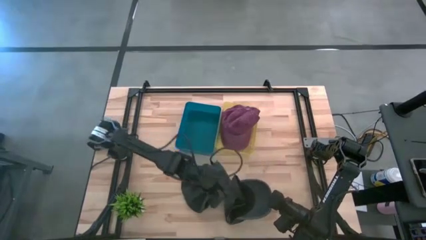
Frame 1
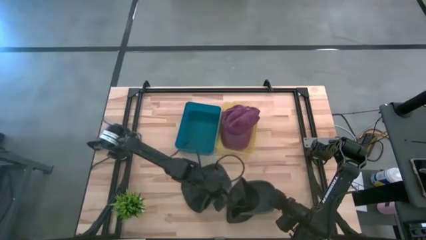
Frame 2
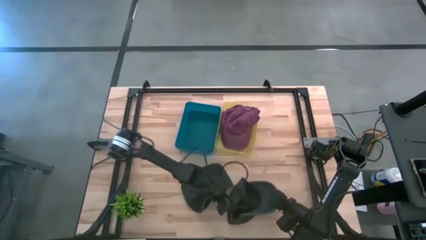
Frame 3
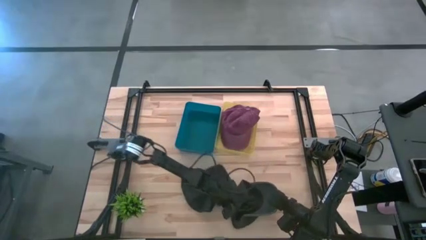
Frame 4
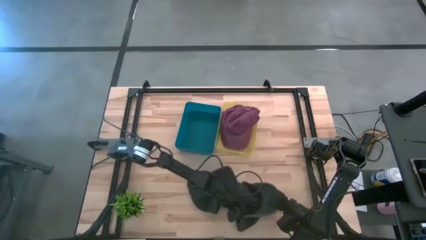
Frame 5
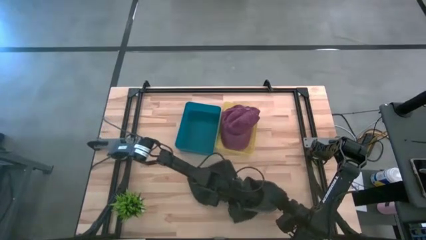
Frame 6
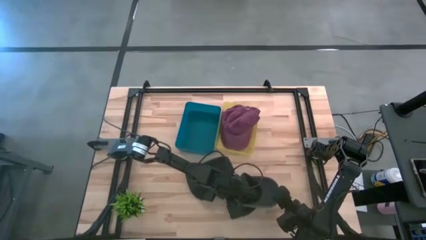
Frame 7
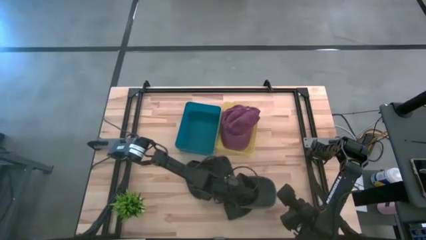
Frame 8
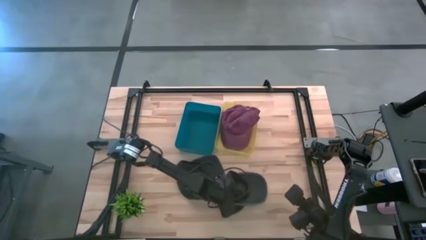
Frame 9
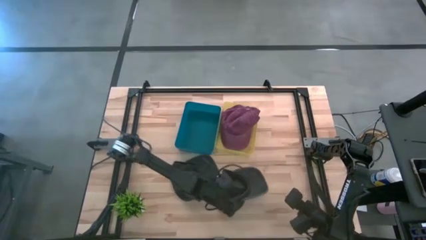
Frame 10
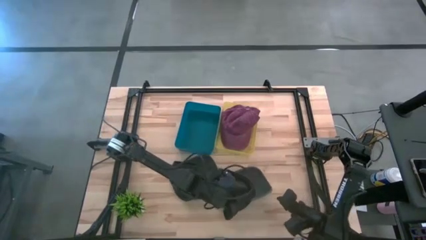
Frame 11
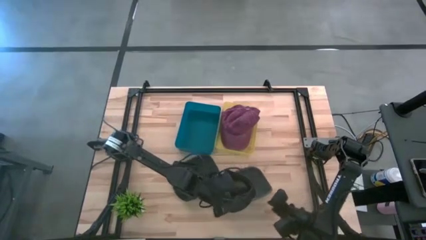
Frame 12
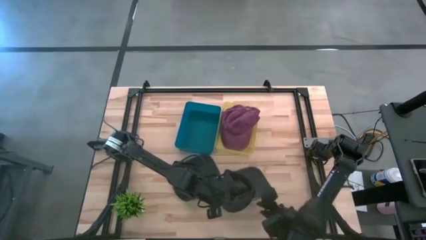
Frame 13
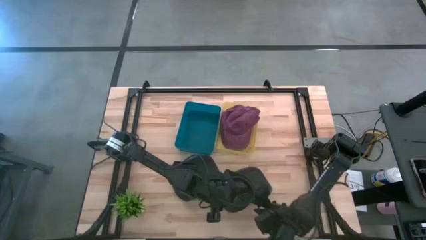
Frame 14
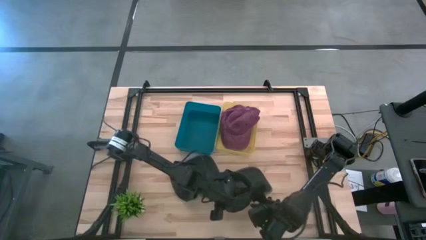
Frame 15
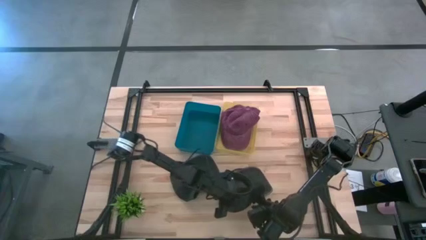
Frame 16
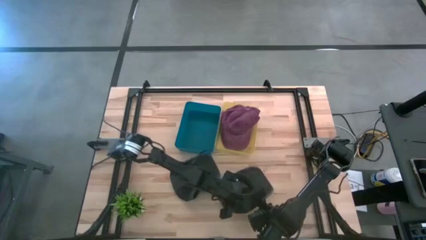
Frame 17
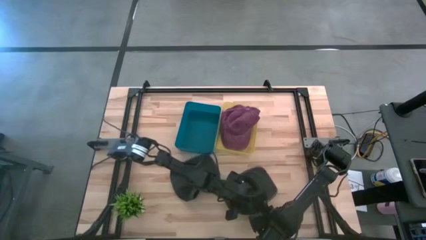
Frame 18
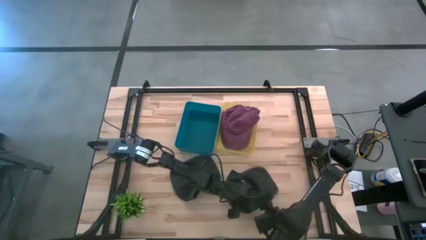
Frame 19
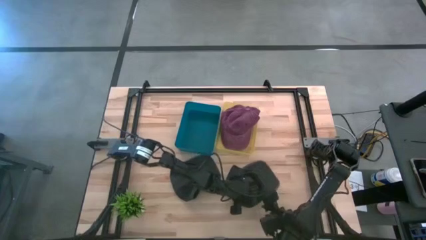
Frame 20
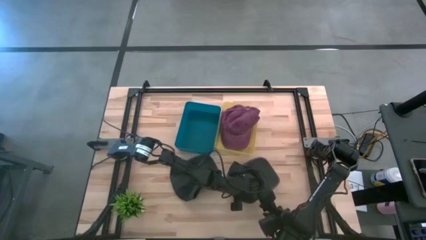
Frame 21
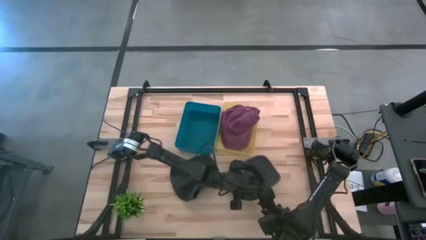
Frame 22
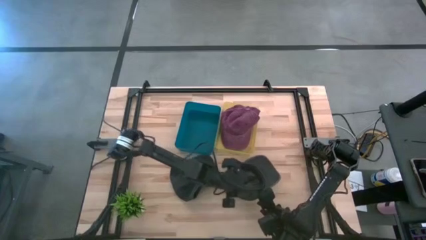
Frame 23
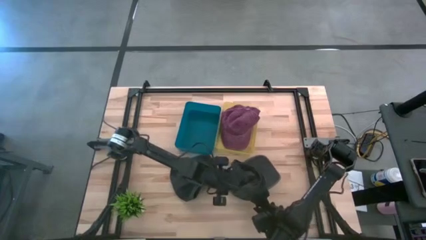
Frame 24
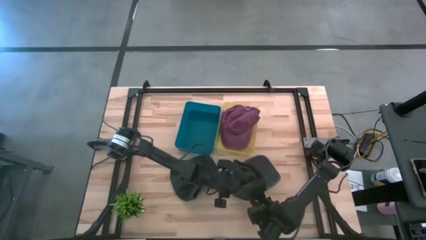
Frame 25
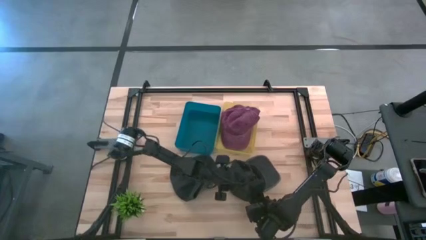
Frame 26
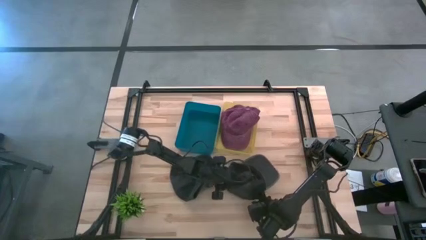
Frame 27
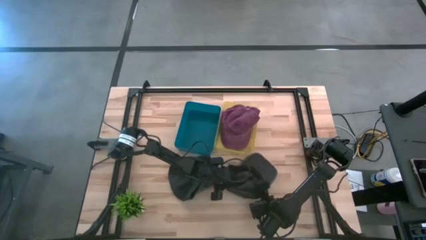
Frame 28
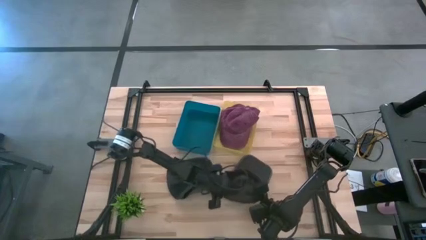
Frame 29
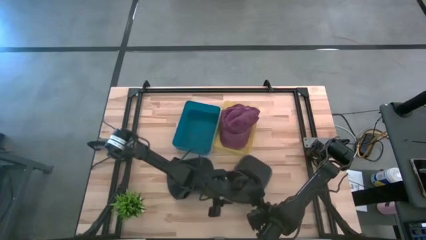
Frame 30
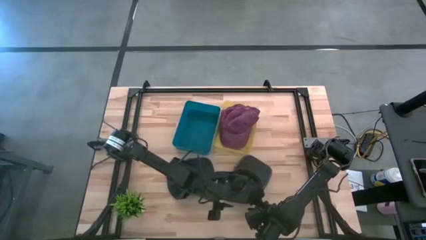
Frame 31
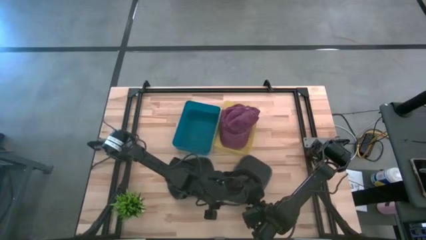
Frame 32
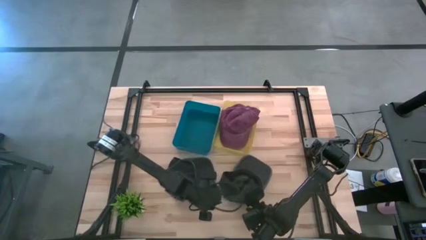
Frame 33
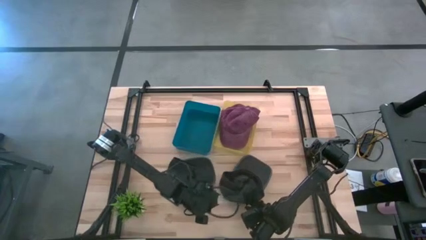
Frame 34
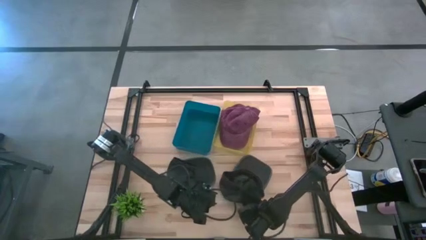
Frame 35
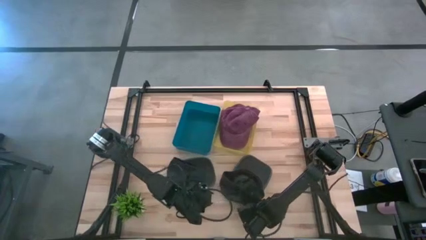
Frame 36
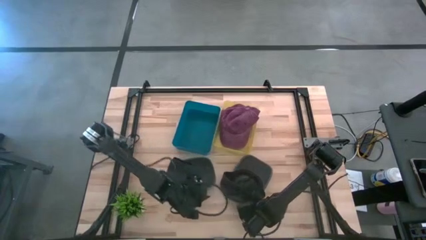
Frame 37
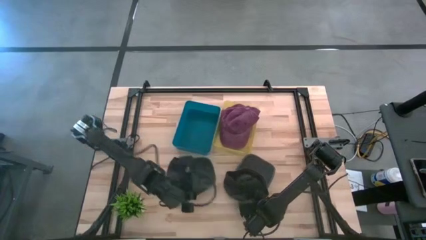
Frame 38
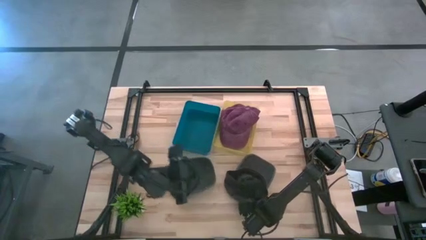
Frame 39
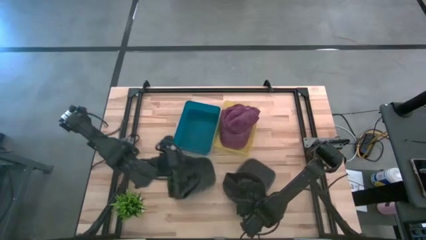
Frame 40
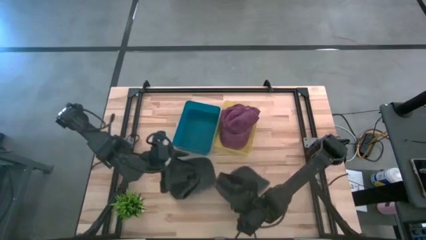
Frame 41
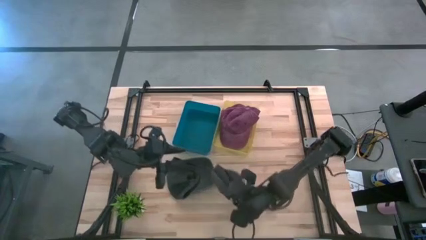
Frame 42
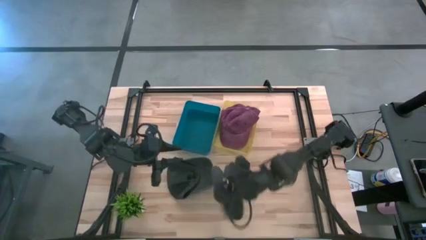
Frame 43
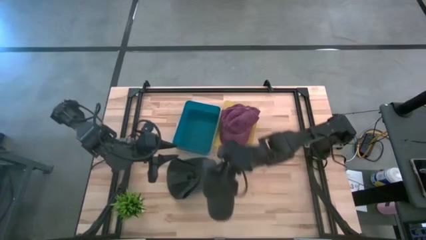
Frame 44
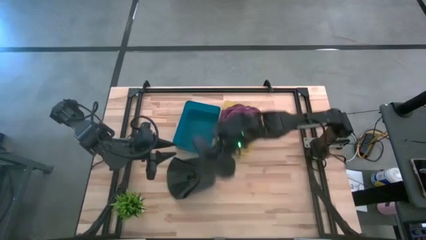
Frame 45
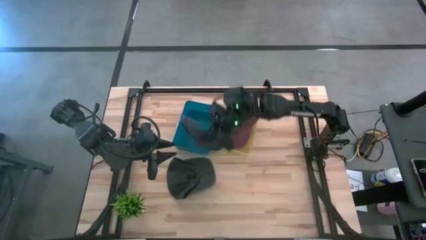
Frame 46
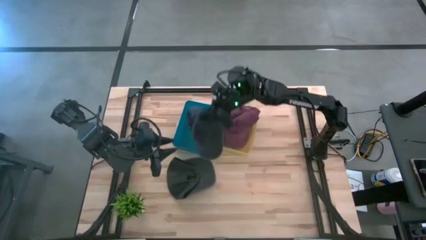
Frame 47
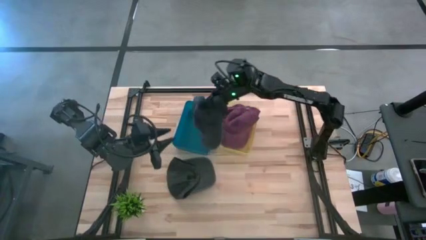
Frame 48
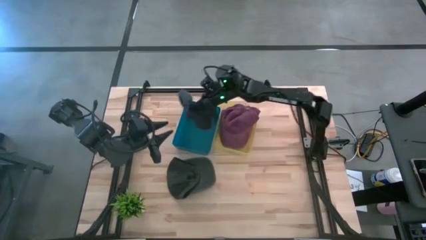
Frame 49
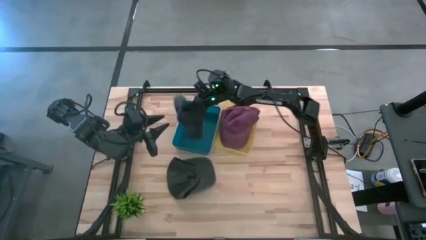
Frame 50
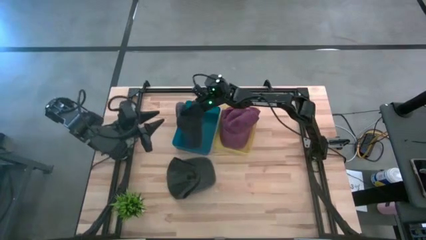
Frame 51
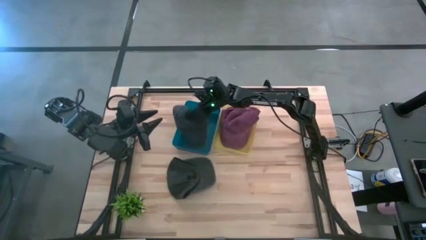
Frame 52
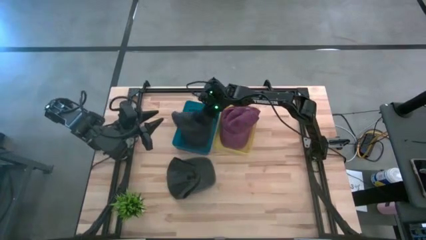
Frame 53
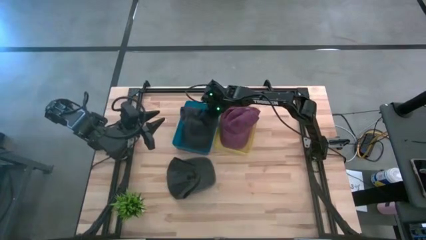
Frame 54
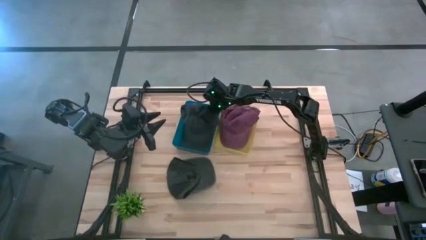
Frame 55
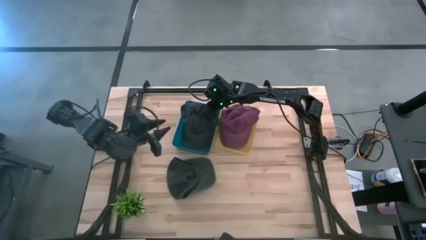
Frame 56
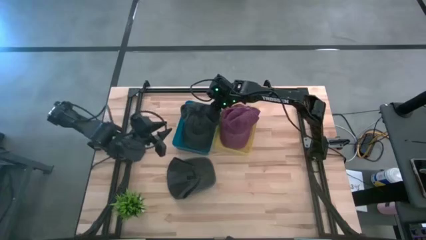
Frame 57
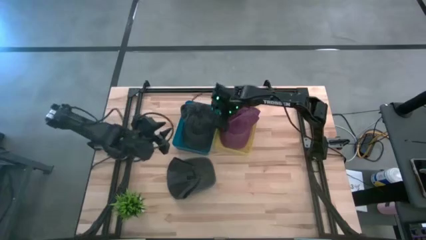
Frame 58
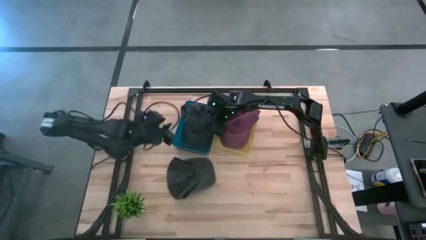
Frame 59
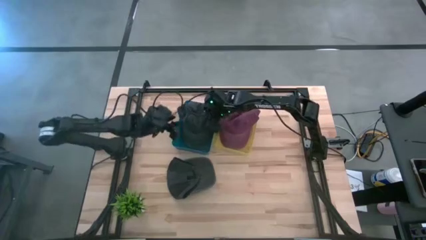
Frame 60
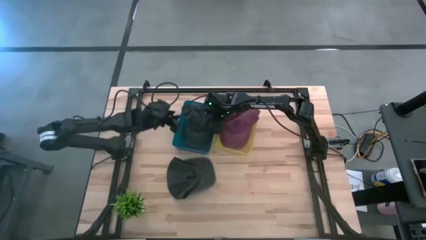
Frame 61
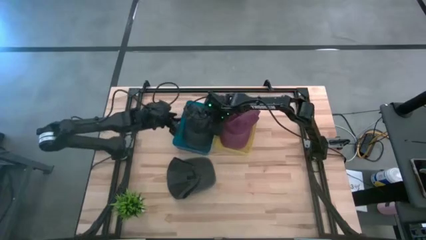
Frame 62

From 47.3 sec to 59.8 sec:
Task: Pick & Place hat
Put the right black cap into the blue bin

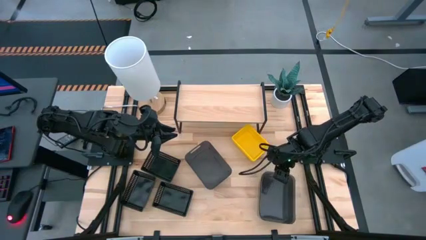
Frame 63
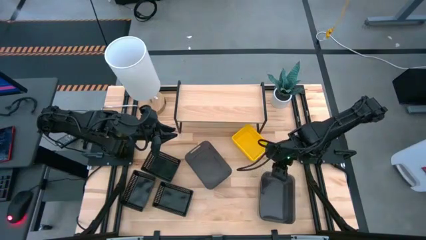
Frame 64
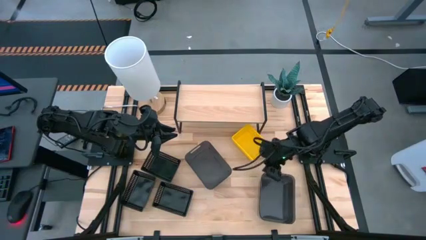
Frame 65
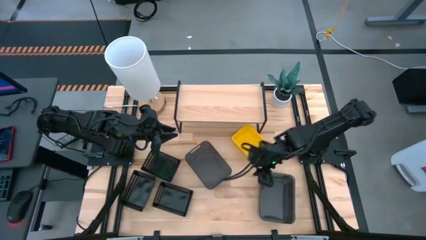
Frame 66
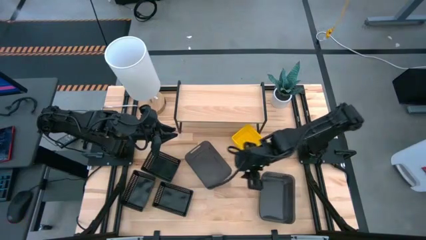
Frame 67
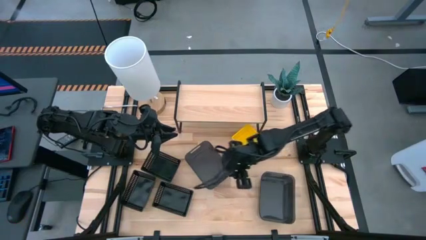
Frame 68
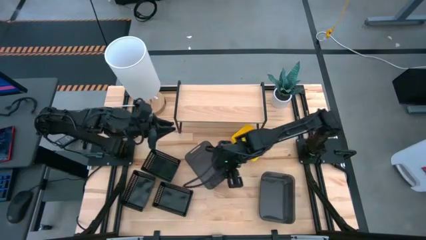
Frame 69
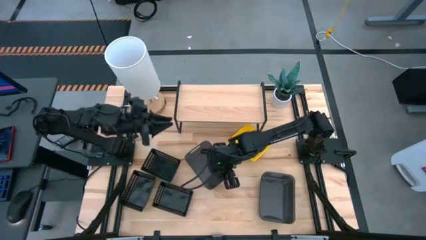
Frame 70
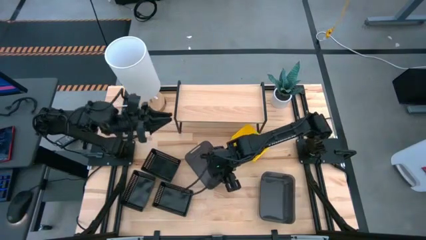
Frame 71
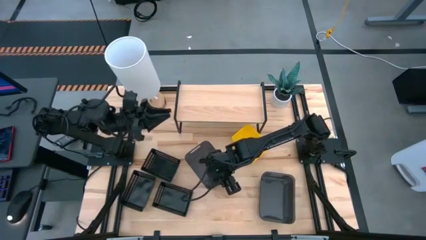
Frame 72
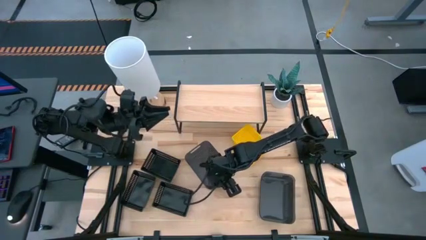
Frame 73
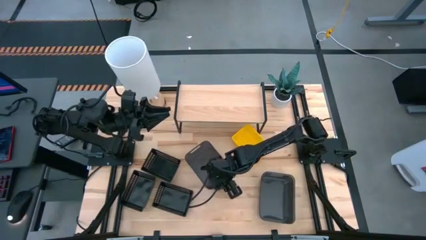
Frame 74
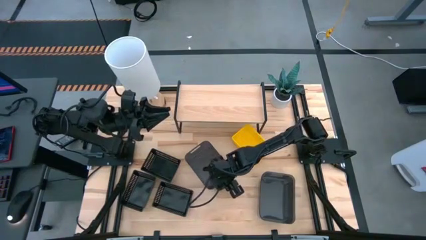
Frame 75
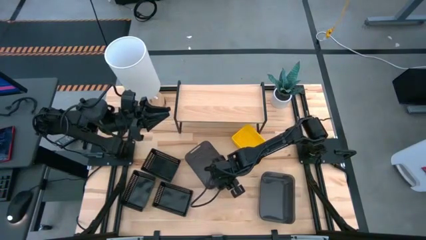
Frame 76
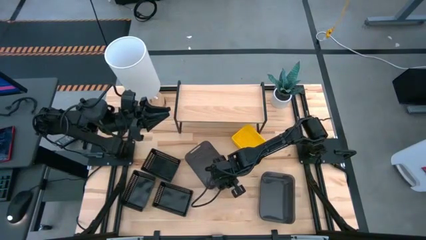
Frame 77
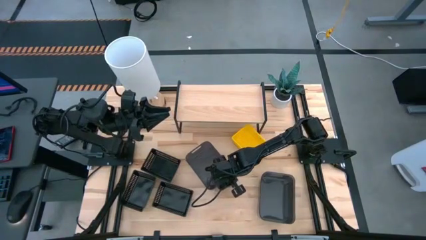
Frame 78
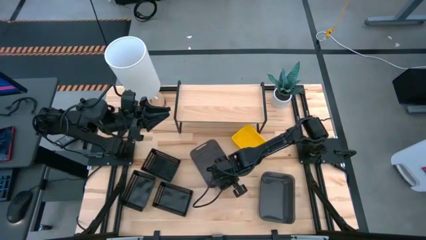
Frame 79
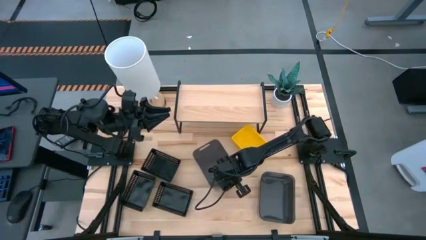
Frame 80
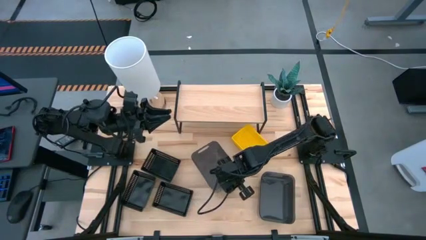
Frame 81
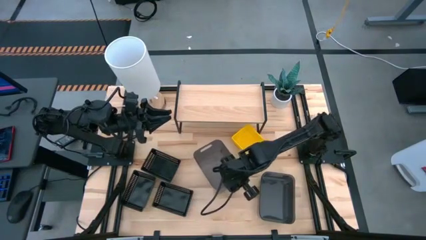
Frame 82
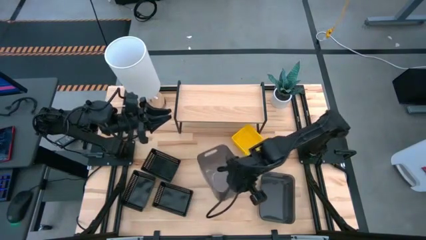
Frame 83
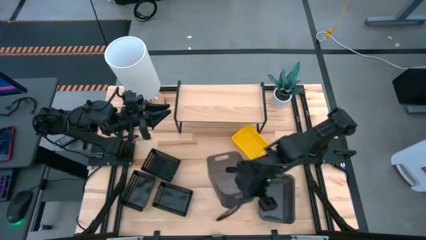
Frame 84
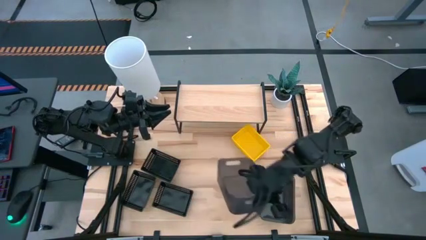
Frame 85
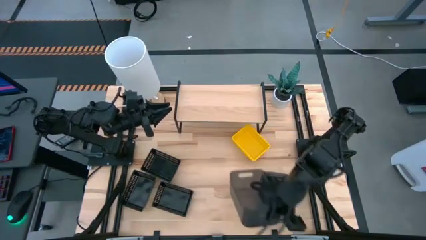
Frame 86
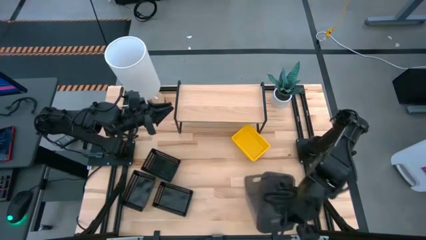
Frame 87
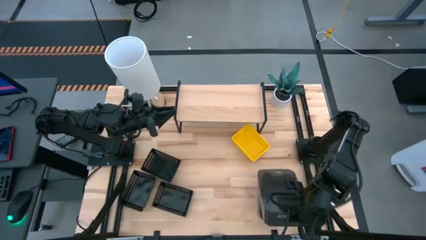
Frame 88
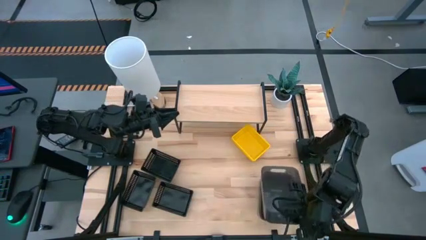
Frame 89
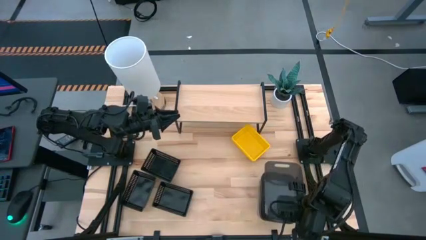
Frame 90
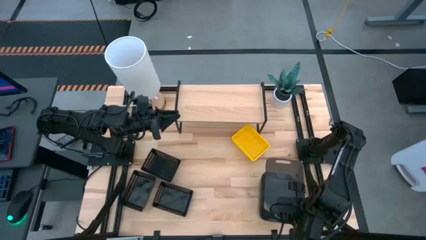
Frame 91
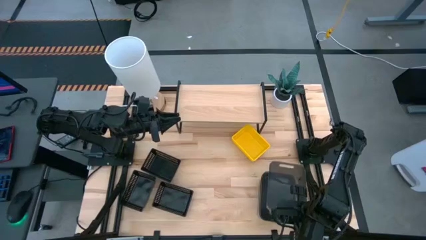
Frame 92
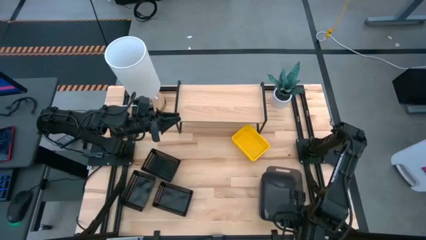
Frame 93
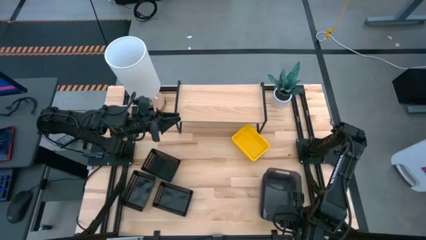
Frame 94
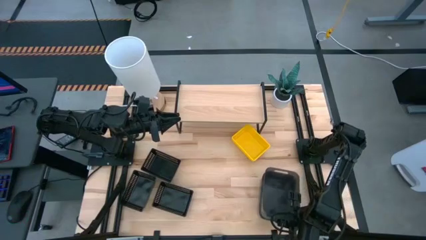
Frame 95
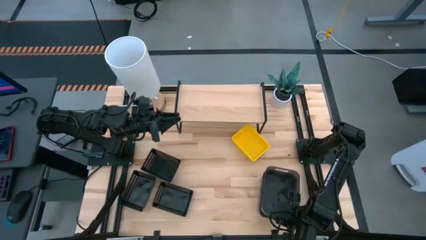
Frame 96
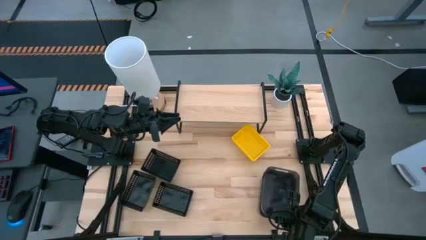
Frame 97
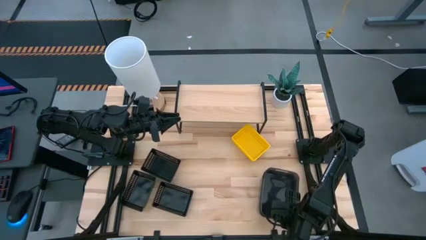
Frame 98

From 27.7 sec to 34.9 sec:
Task: Stack baskets on shelf by color
Stack the left gray bin on top of the right gray bin
